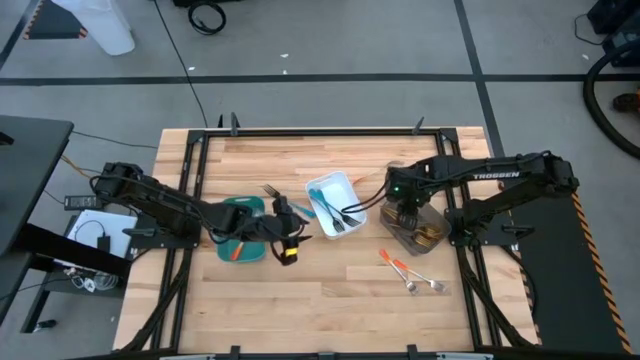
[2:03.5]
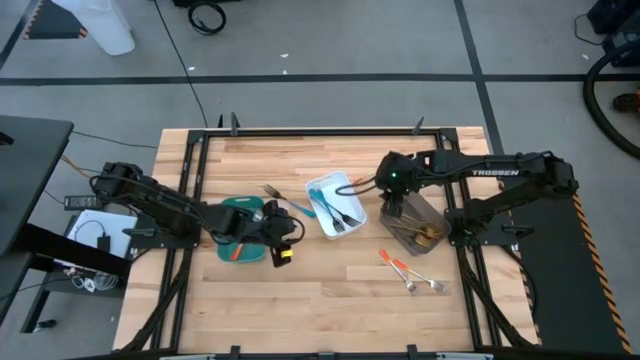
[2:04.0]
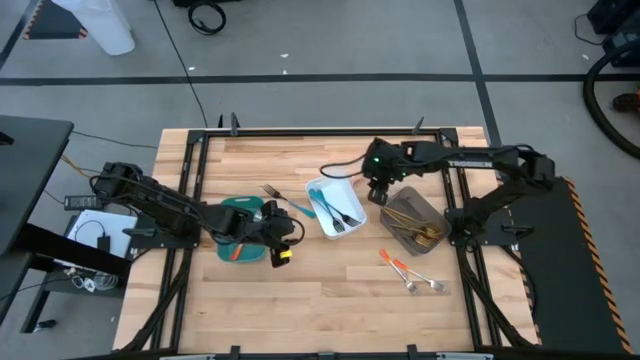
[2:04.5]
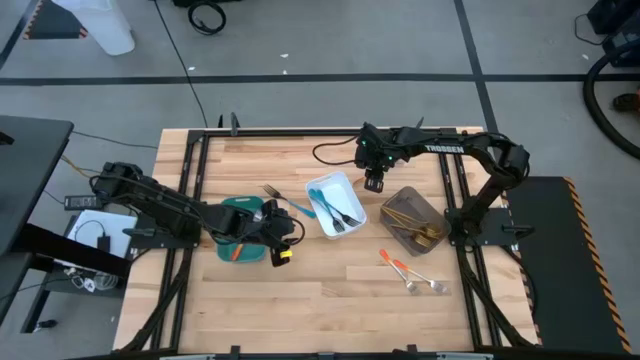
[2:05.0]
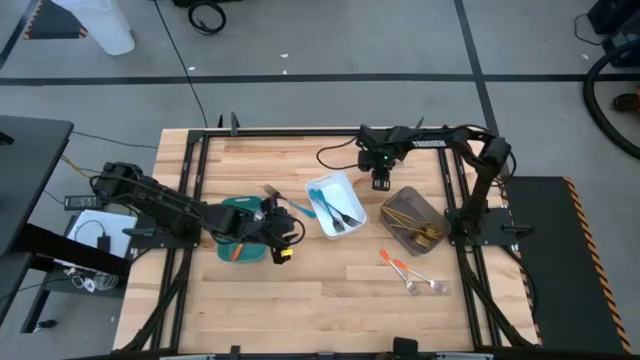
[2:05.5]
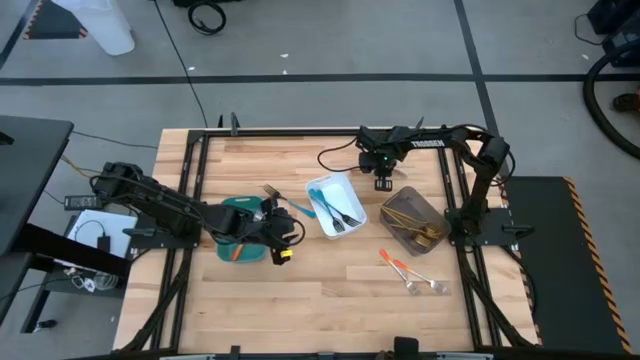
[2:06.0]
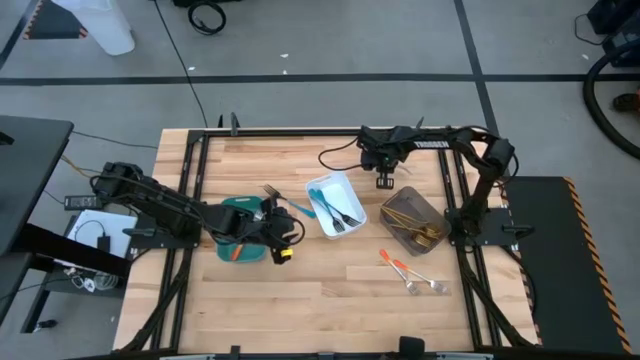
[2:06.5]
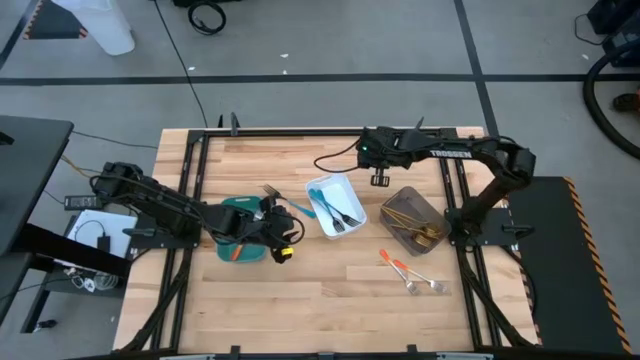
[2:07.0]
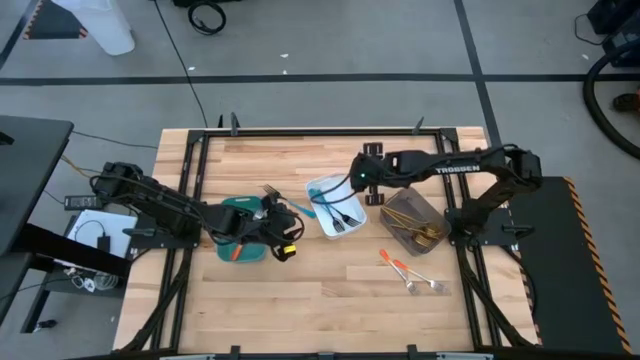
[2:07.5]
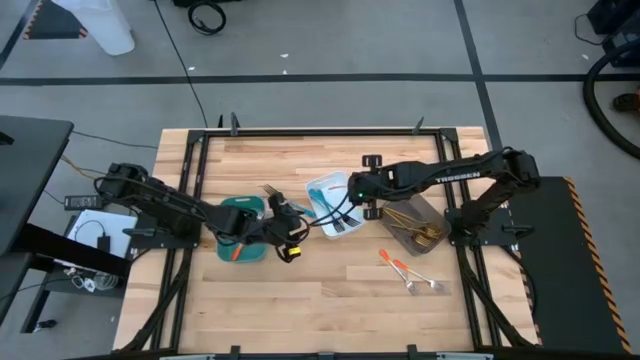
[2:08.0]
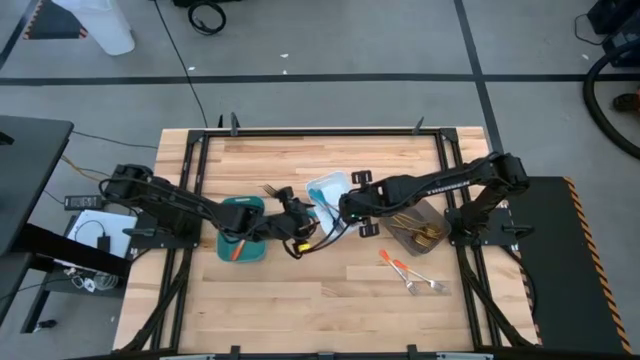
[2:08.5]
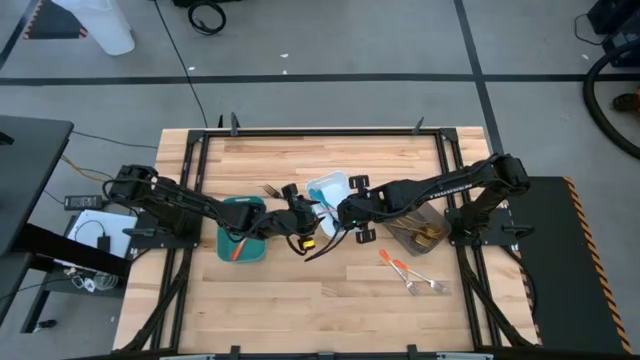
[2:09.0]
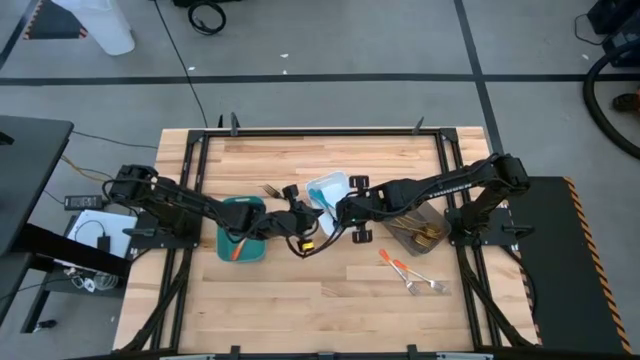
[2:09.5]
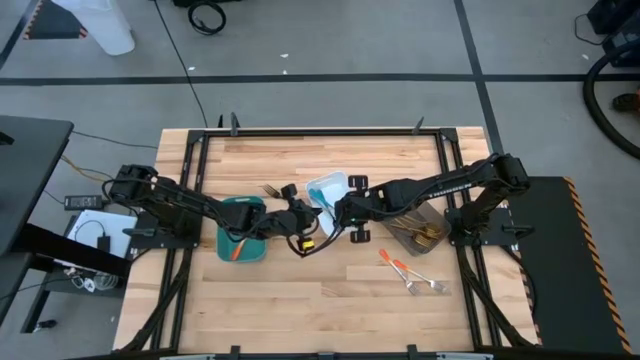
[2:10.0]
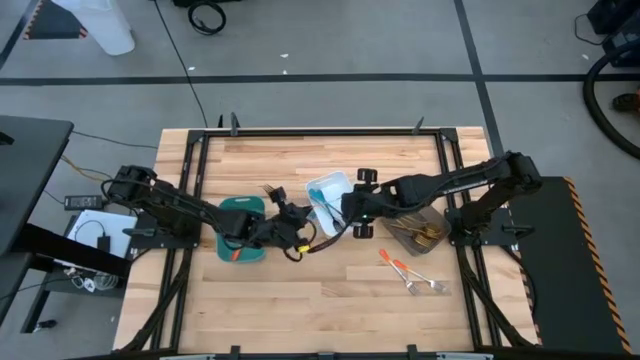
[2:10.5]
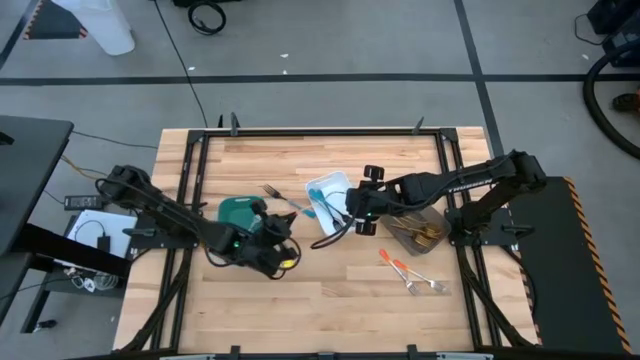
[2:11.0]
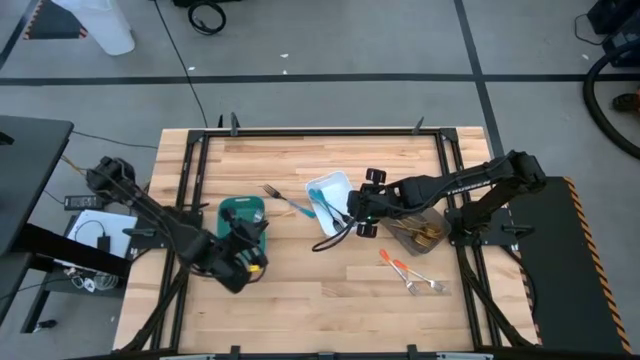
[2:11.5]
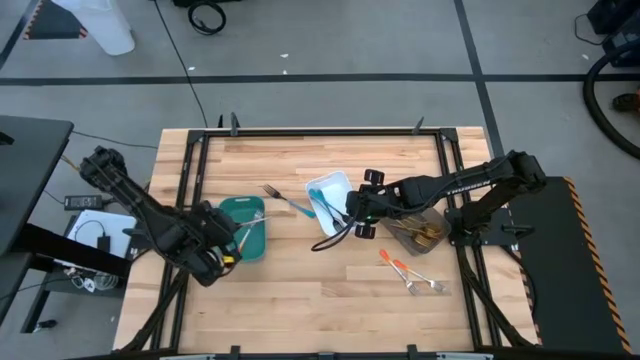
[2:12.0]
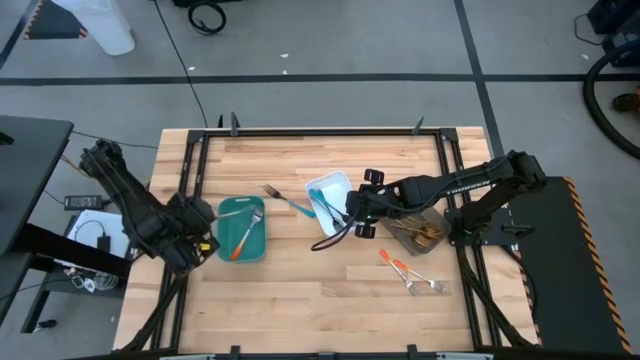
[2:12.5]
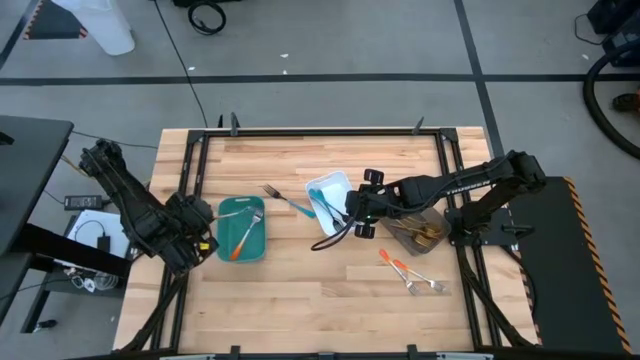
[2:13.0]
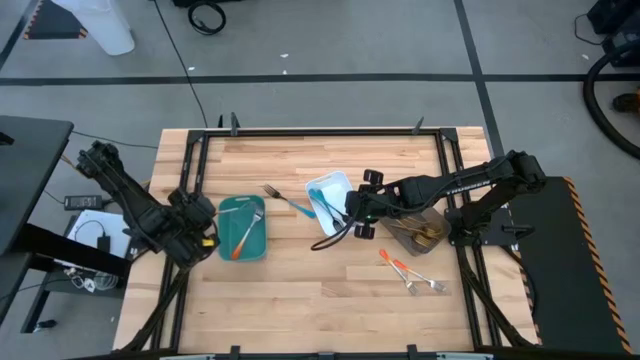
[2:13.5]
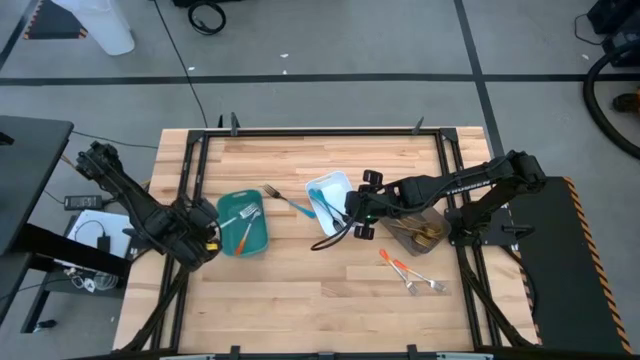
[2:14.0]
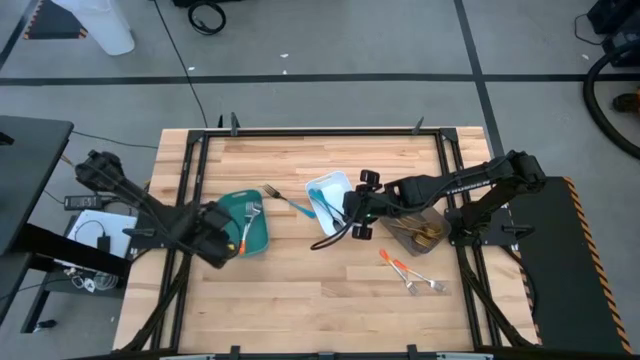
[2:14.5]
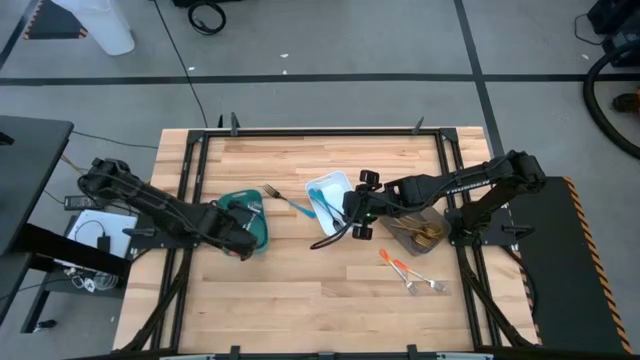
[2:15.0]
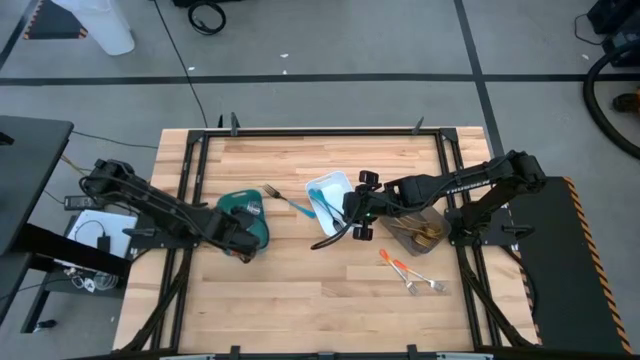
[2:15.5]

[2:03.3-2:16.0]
Task: Sort silverware by color (type)
Put the orange fork into the green bin

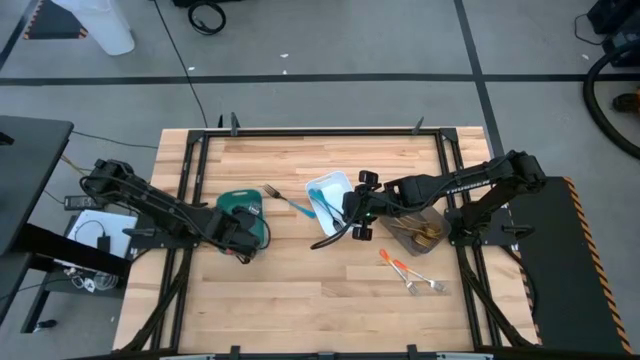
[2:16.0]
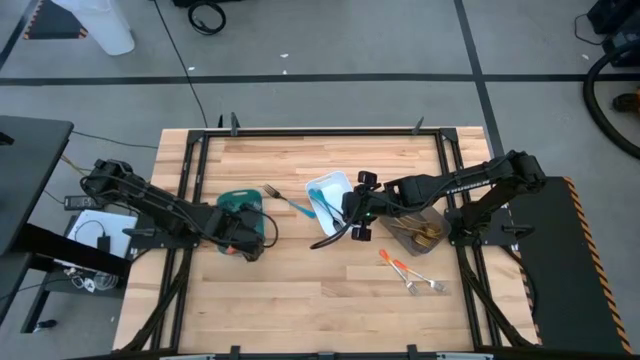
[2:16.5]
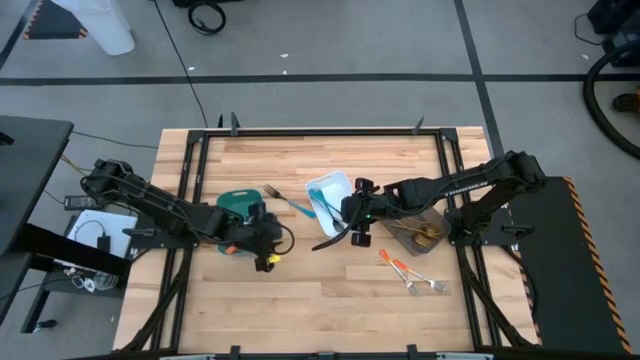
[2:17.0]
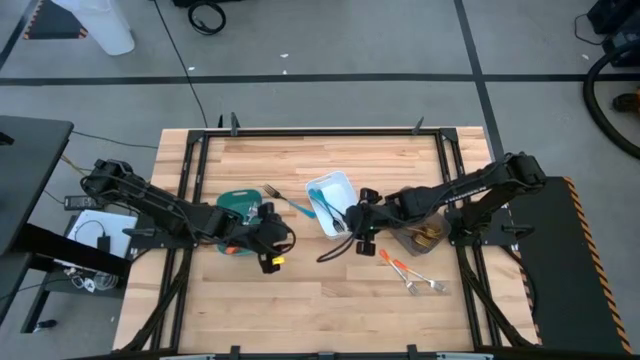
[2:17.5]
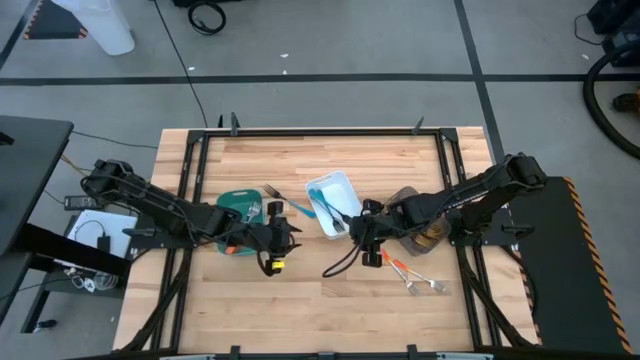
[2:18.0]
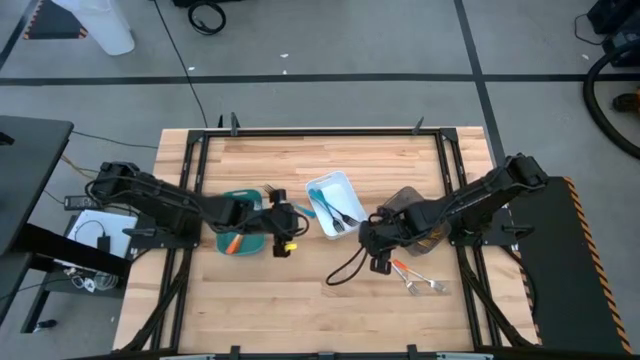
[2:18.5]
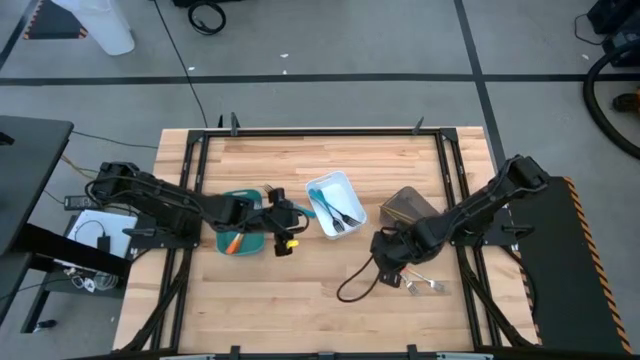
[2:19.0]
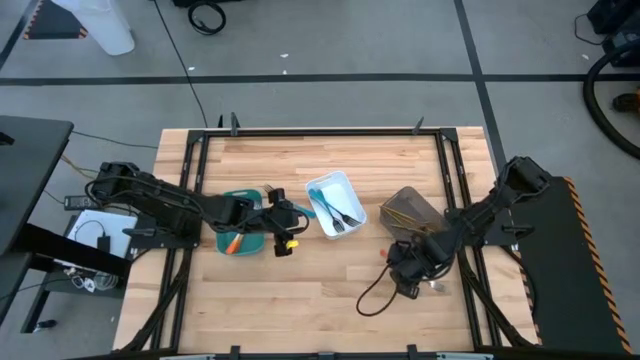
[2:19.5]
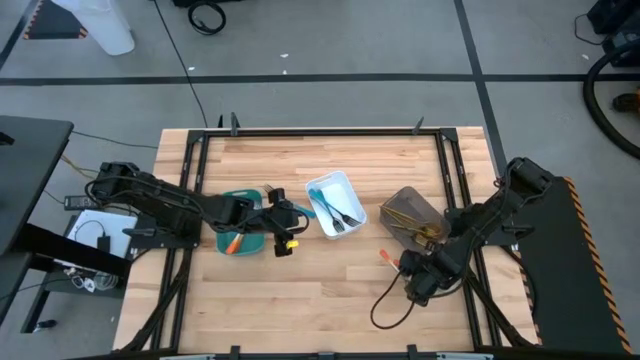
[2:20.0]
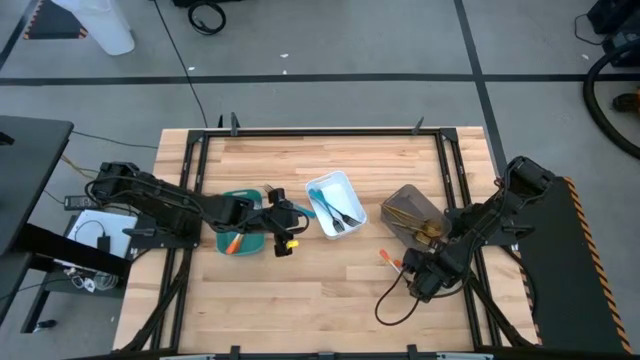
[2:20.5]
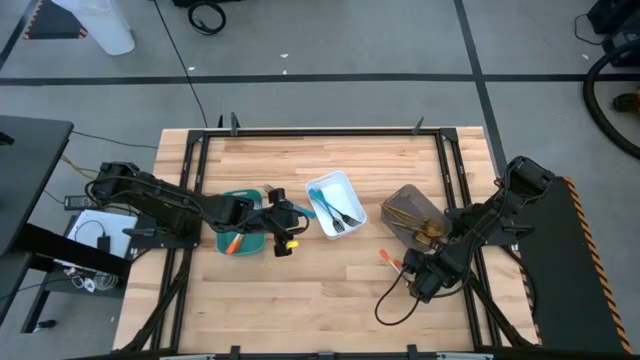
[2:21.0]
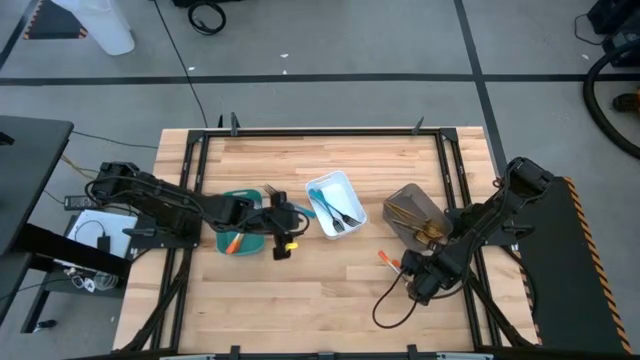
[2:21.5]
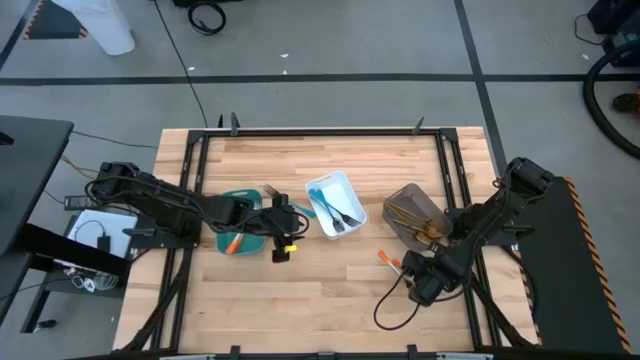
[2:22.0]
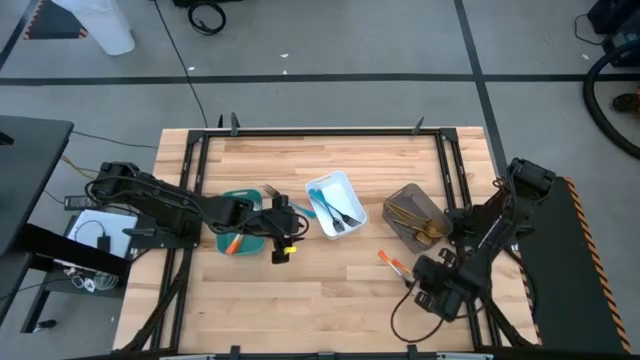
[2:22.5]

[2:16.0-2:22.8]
Put the orange fork into the green bin

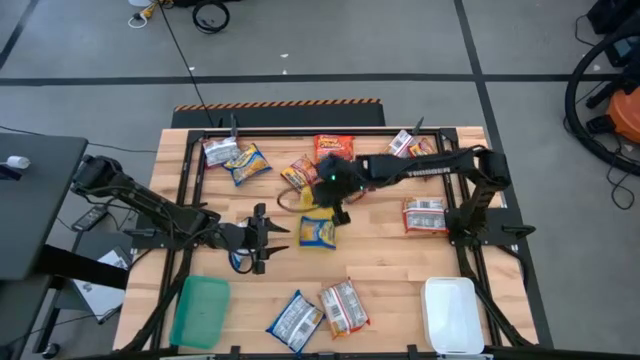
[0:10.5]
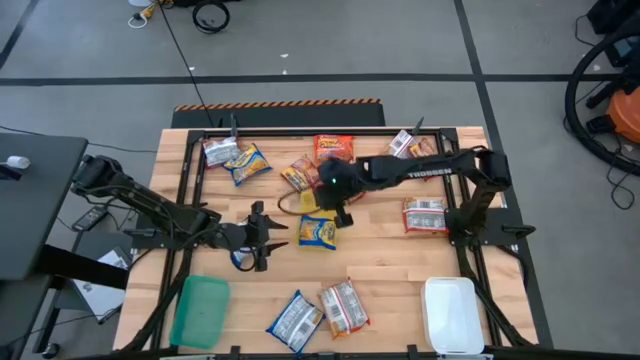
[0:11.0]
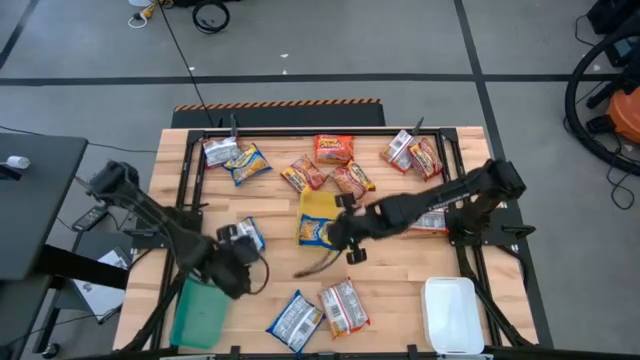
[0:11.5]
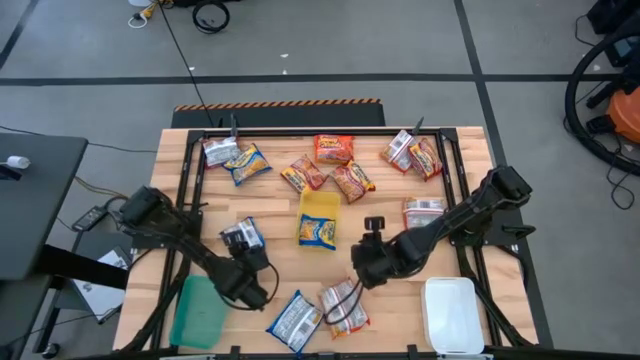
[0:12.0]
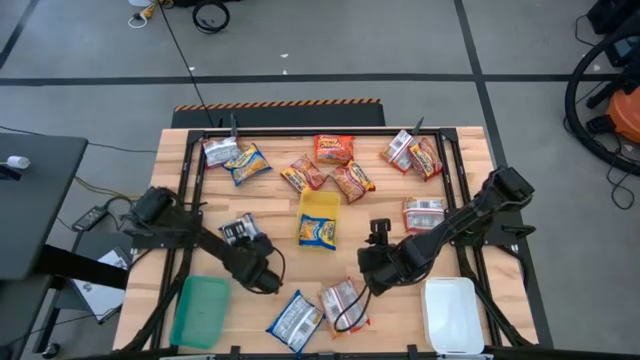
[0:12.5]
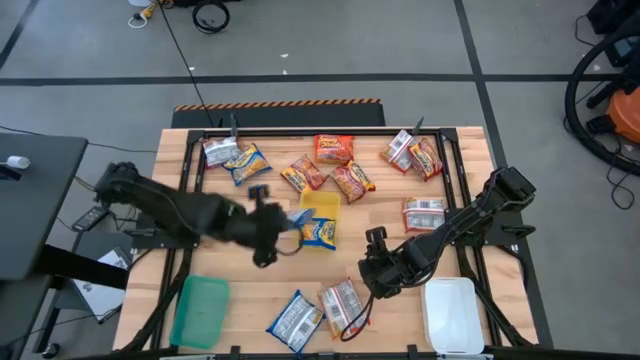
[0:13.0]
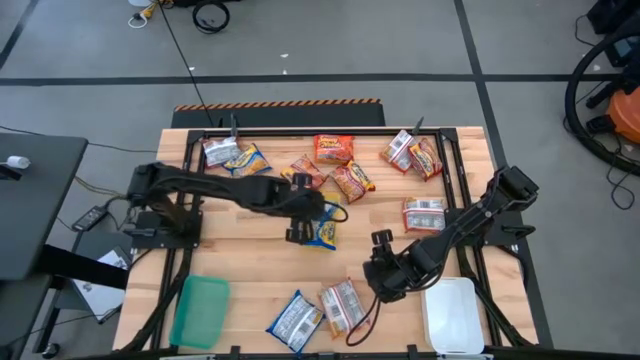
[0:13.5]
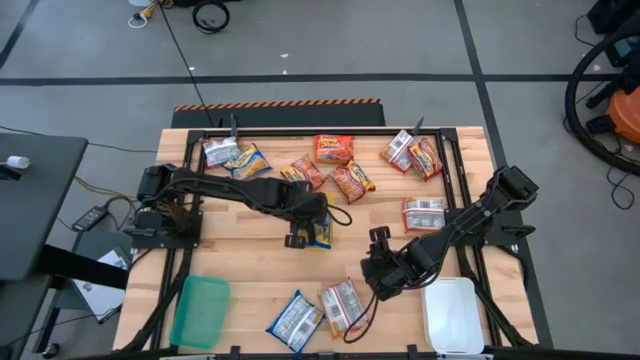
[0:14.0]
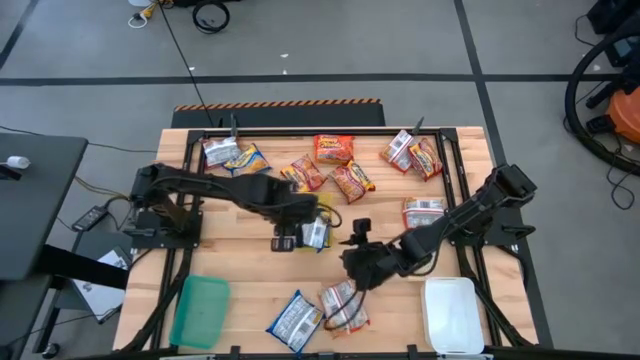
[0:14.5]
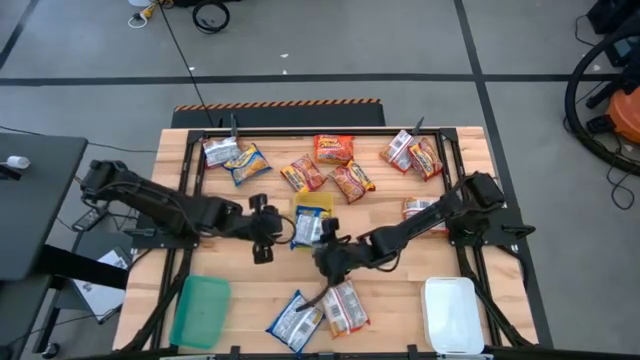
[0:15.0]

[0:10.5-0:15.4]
Task: Sort Maruchan noodles
Put the blue noodle pack into the yellow bin
